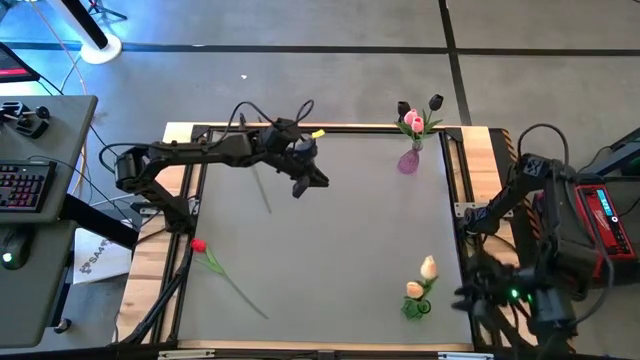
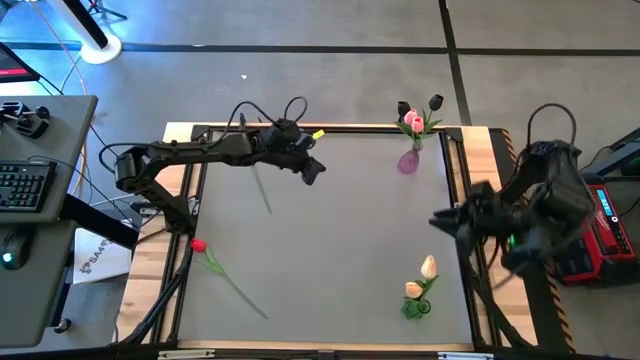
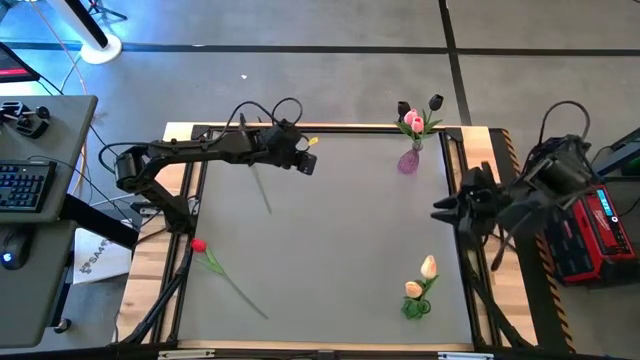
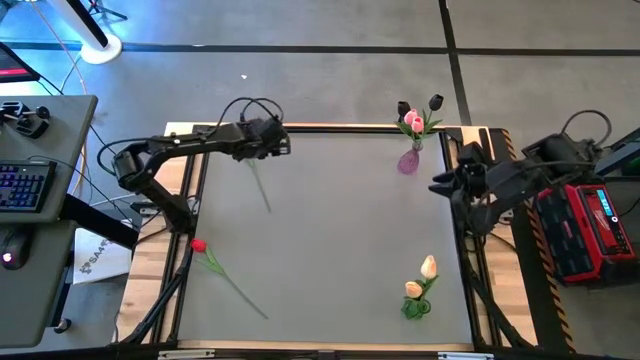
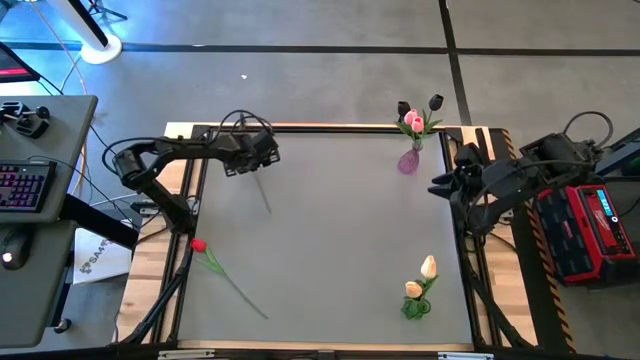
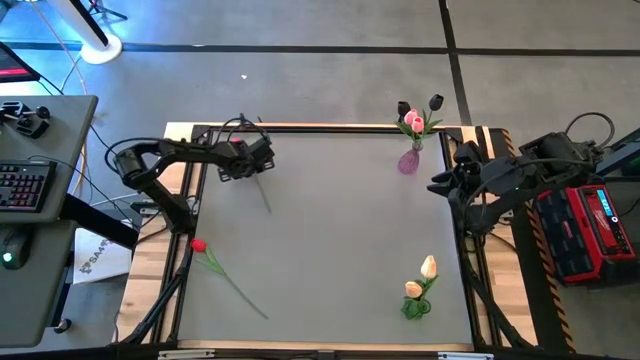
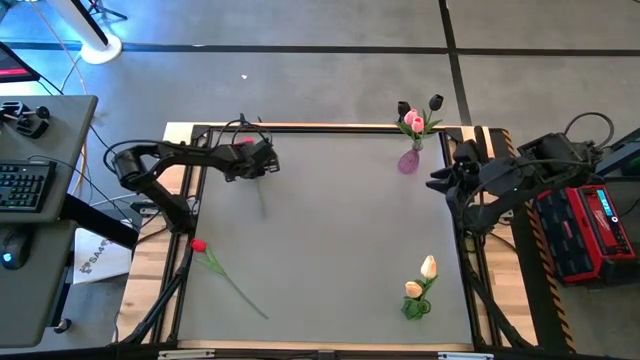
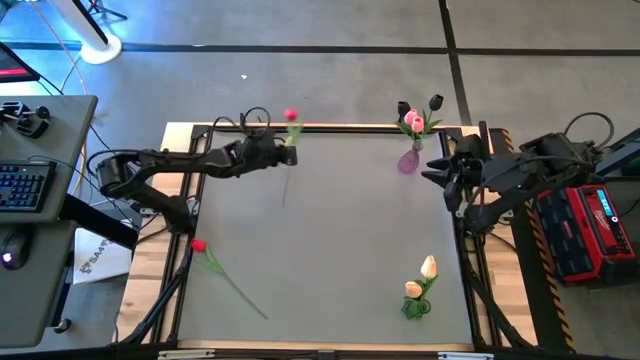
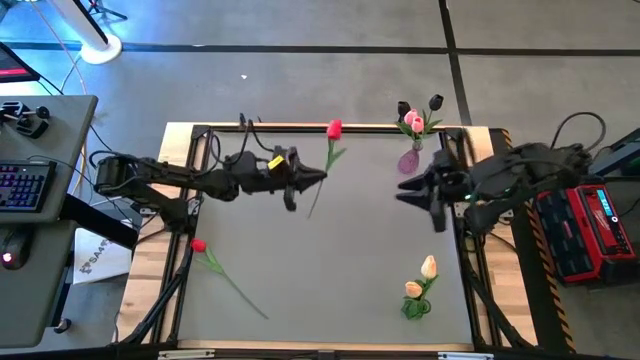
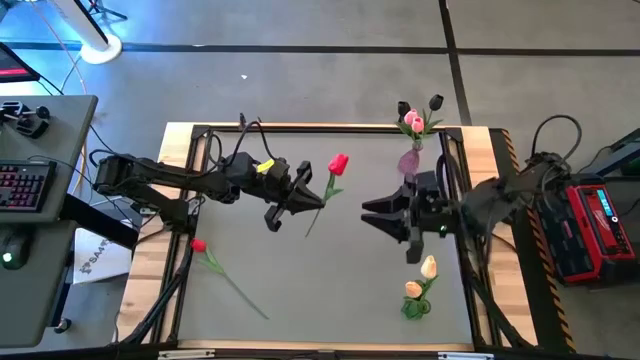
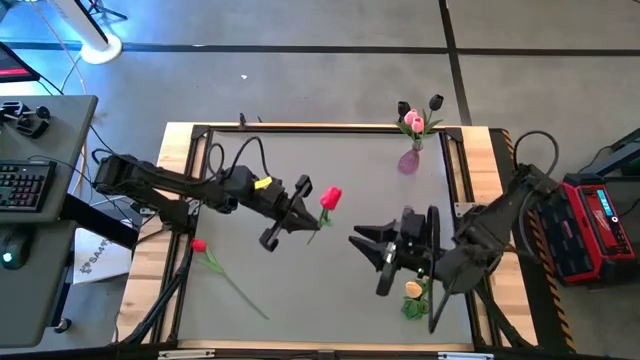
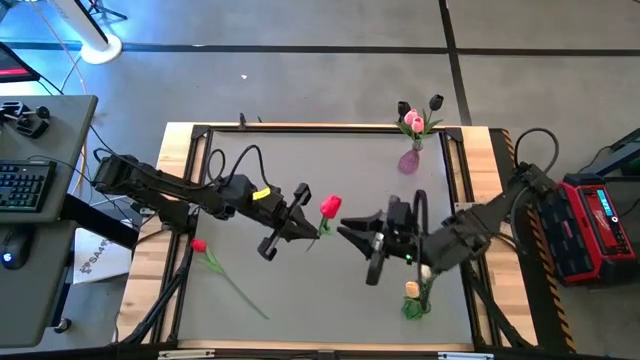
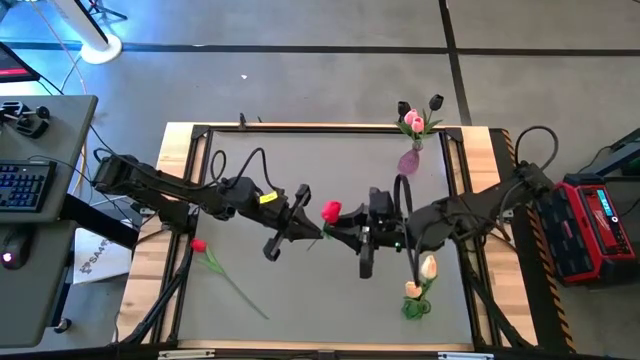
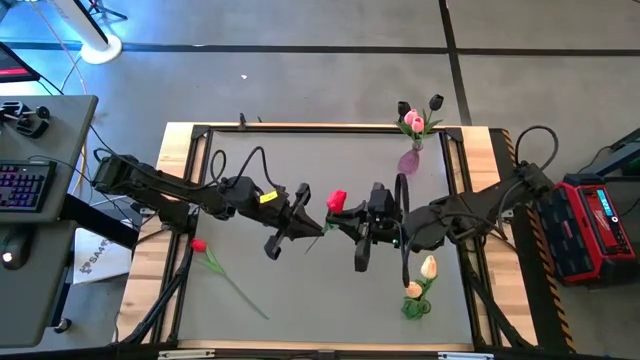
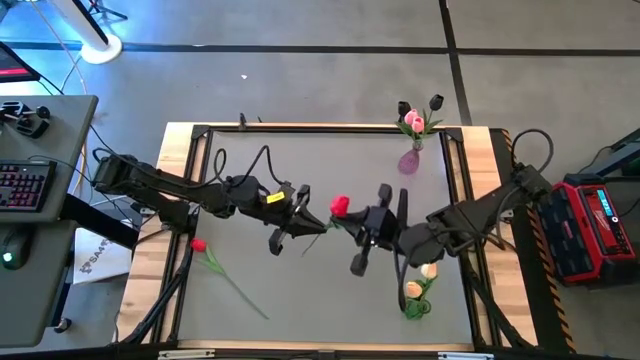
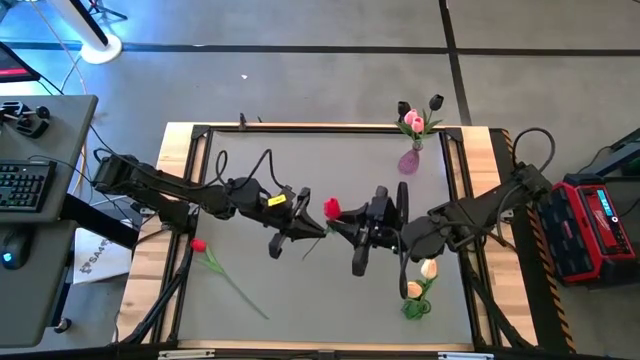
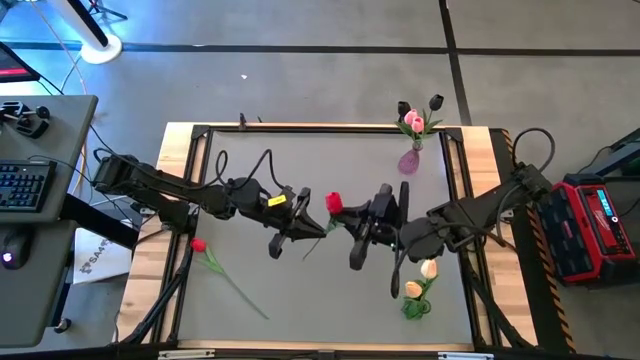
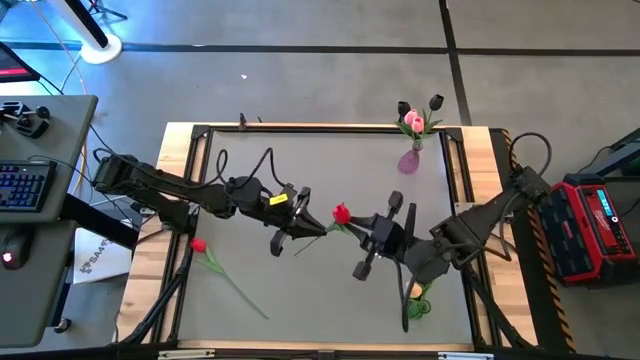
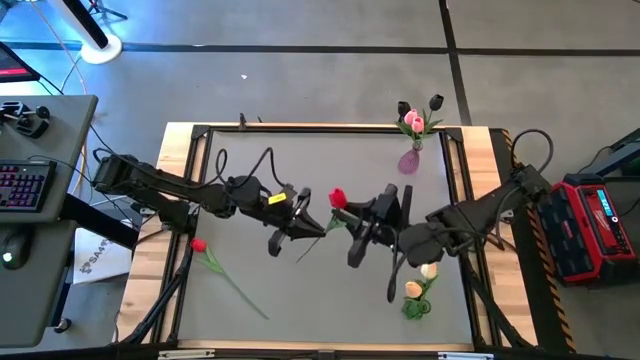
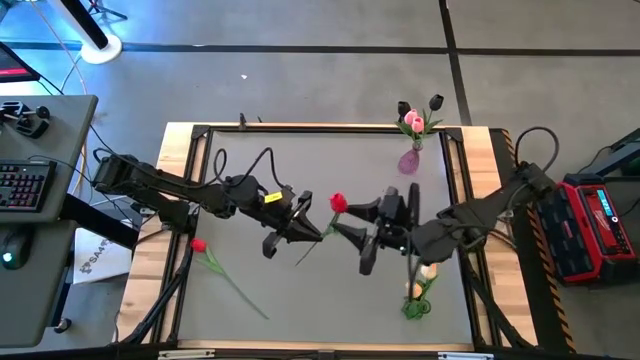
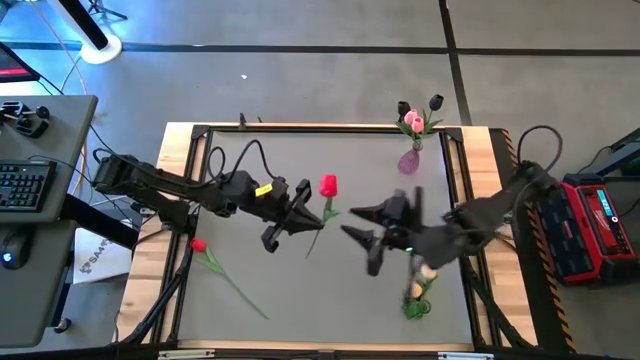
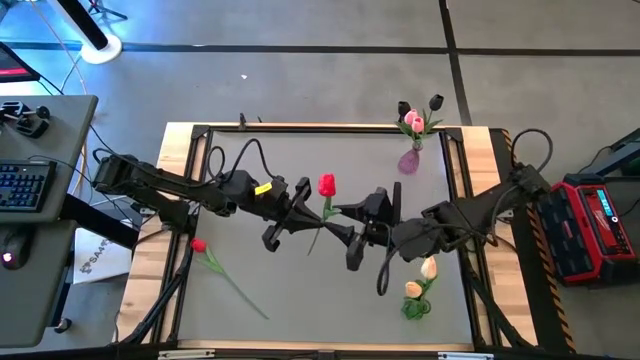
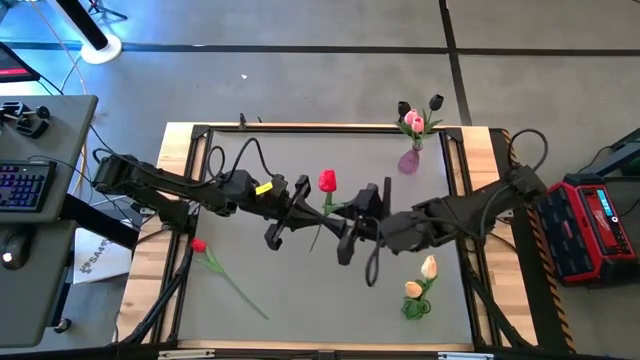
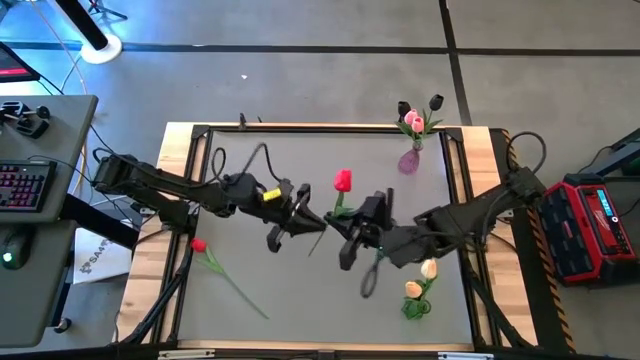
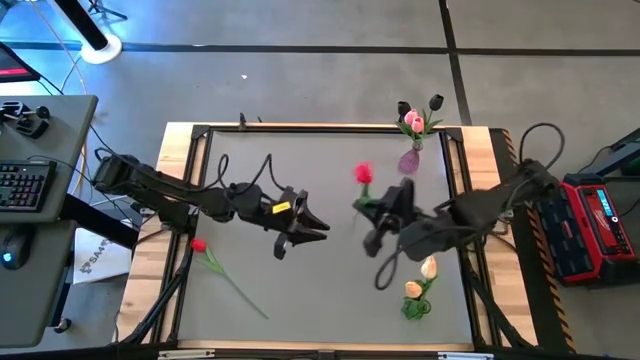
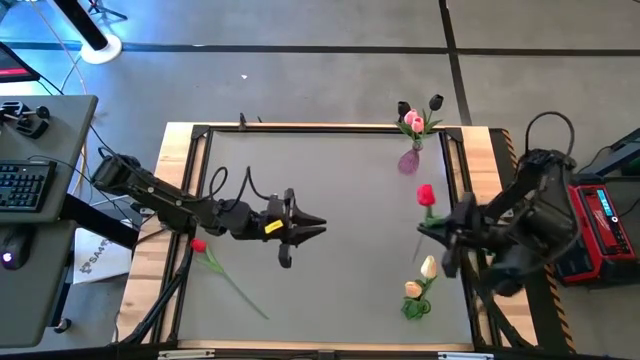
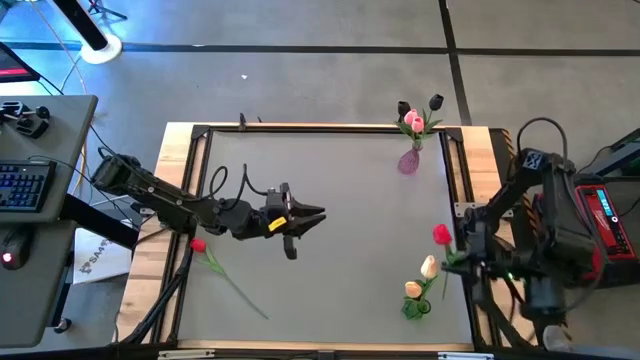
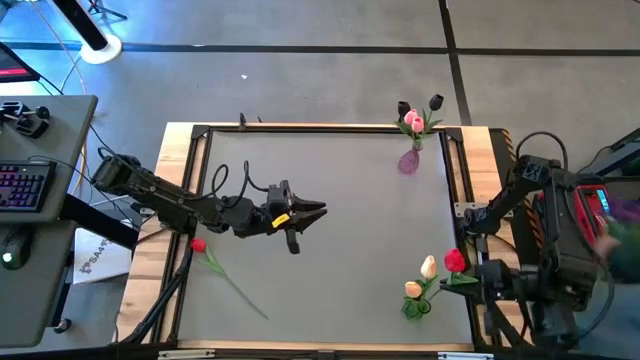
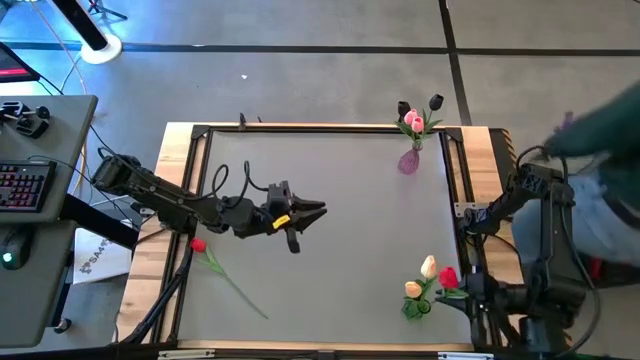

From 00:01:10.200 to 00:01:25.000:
Task: Sort flowers into vase by color
Put the top red tulip into the green vase

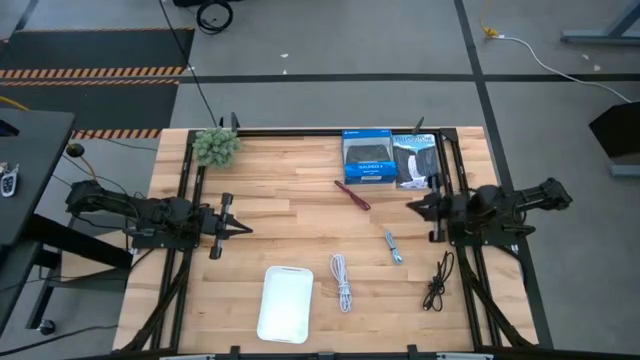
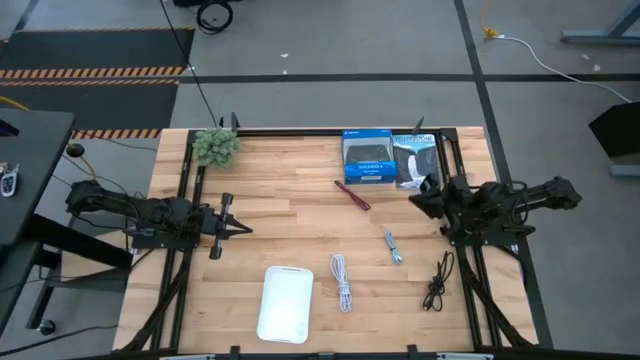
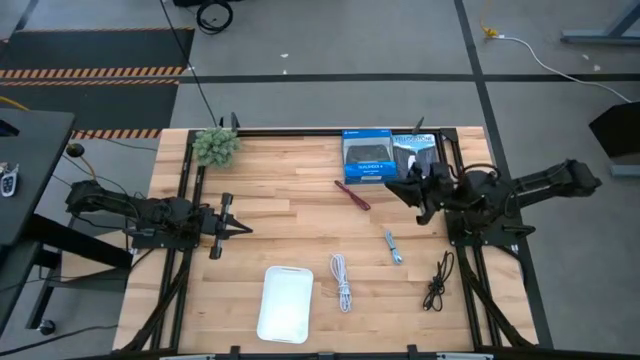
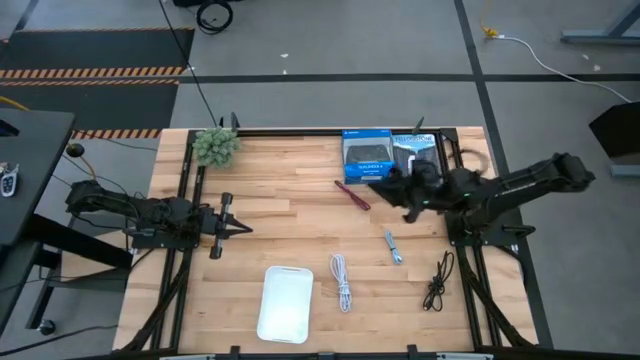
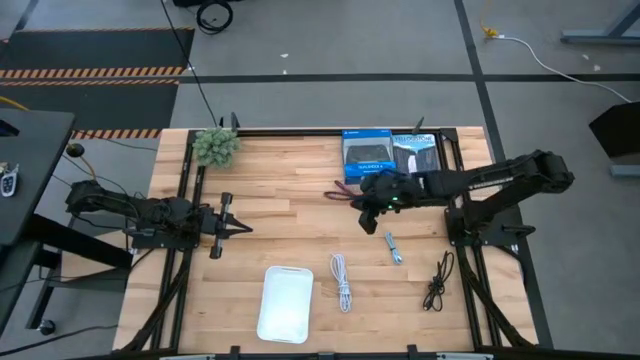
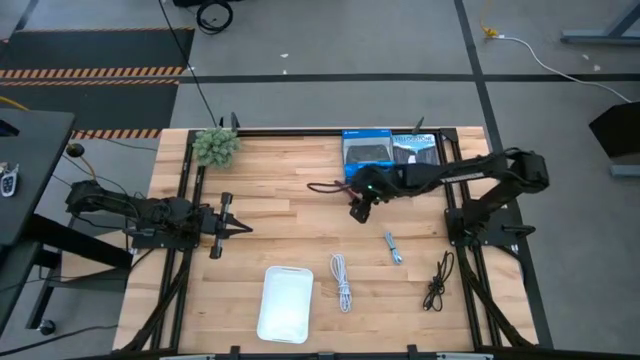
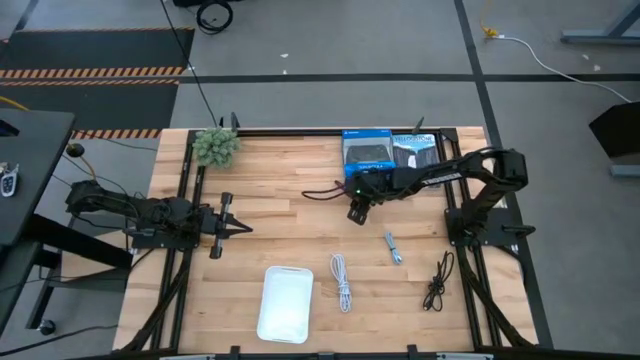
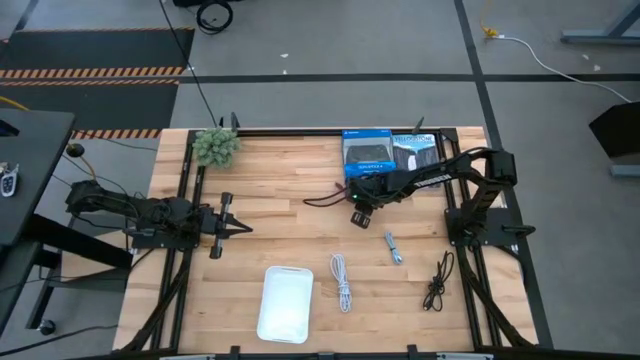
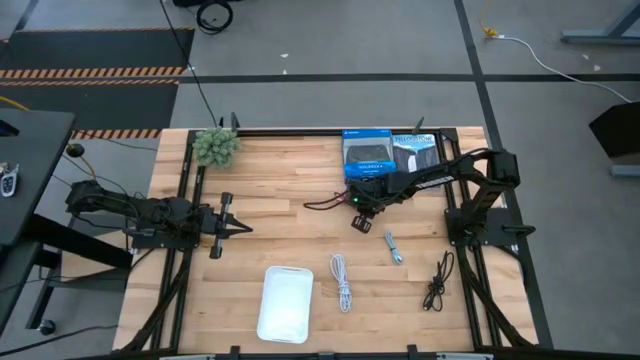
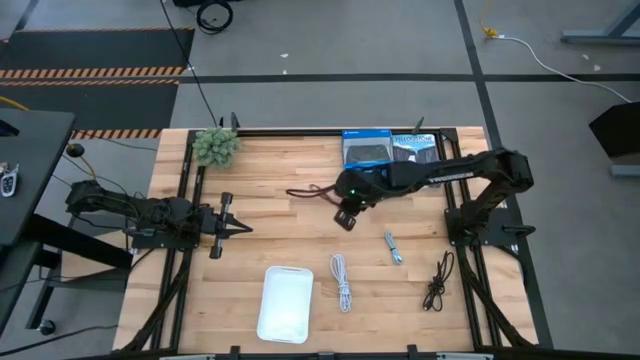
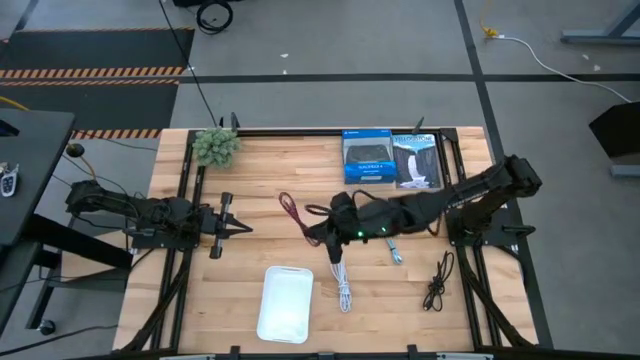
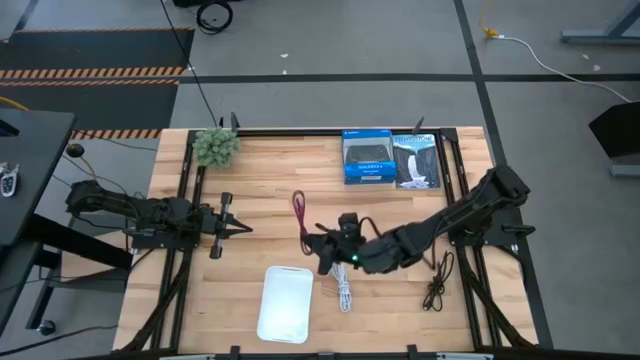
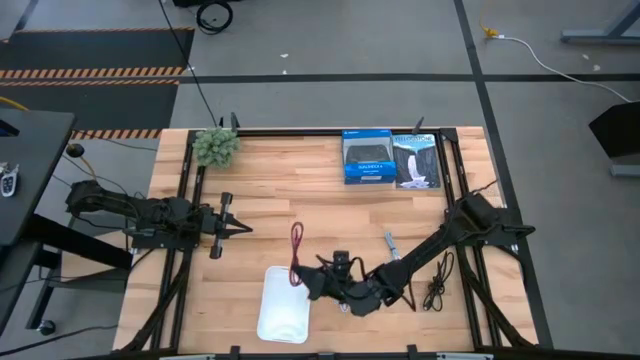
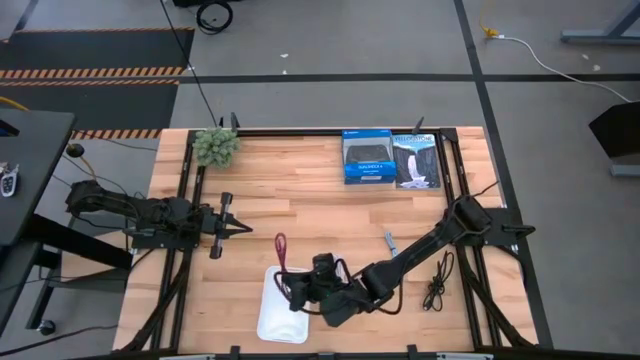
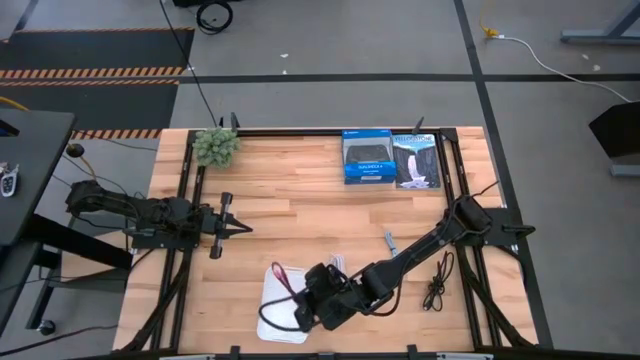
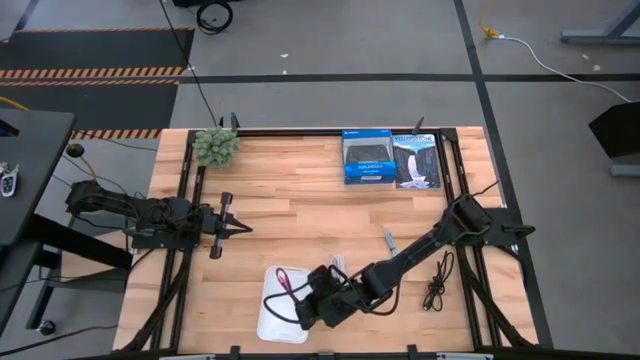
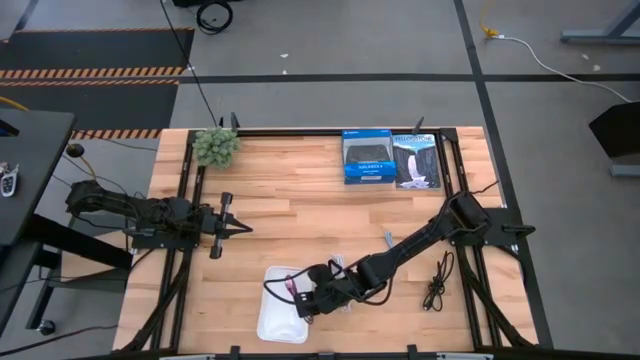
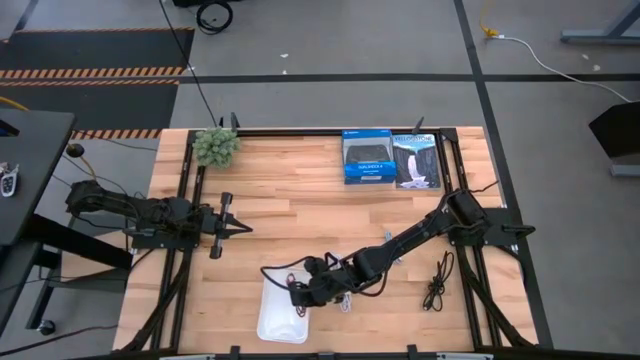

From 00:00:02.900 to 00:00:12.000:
Task: Pick and place USB-C Cables
Put the pink charger cable into the bin
